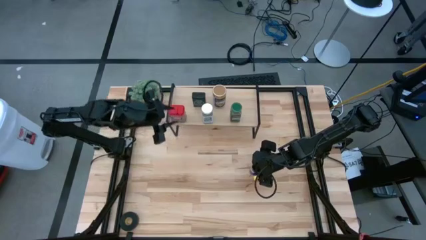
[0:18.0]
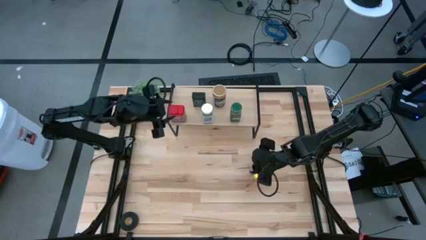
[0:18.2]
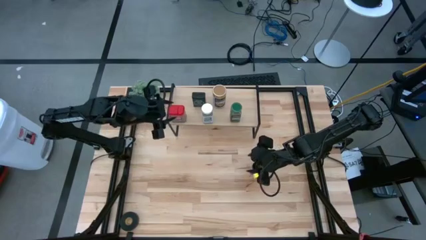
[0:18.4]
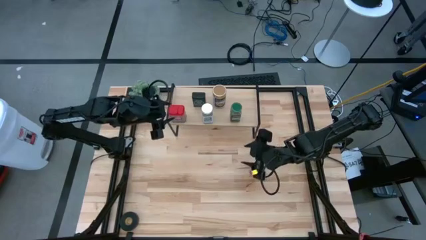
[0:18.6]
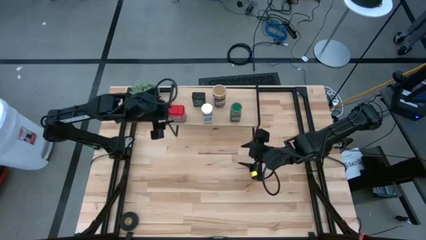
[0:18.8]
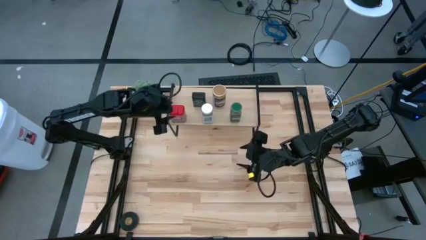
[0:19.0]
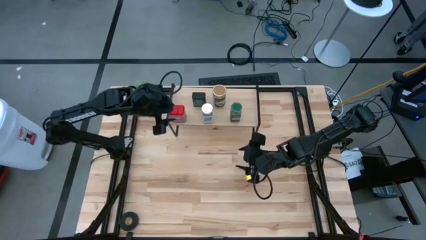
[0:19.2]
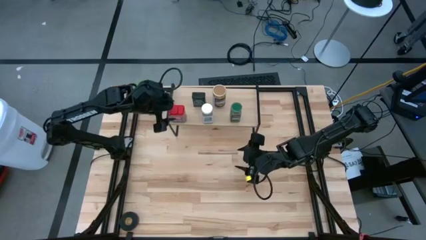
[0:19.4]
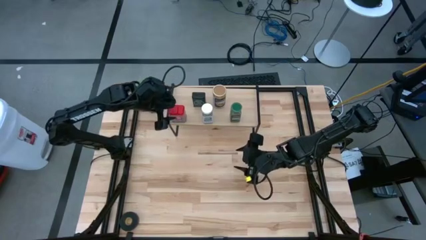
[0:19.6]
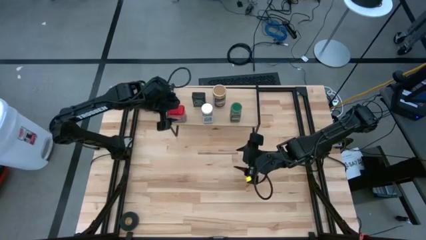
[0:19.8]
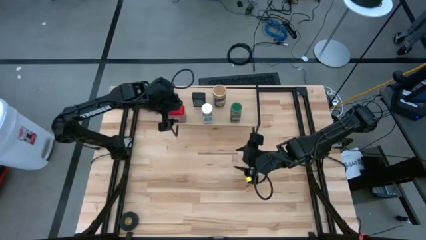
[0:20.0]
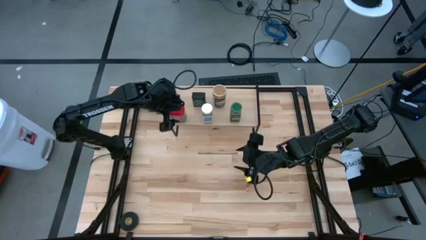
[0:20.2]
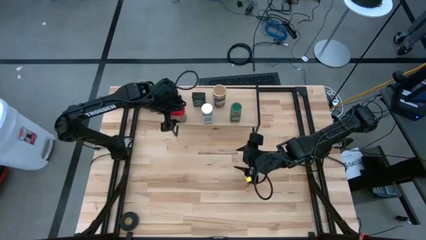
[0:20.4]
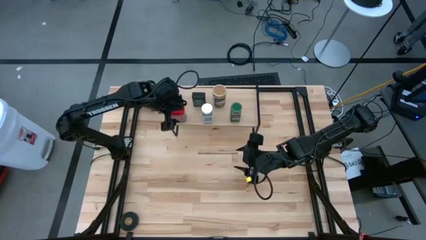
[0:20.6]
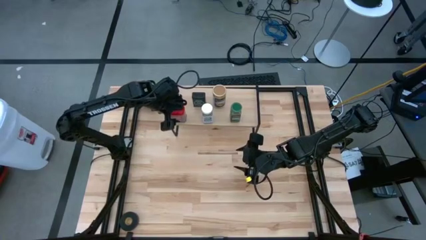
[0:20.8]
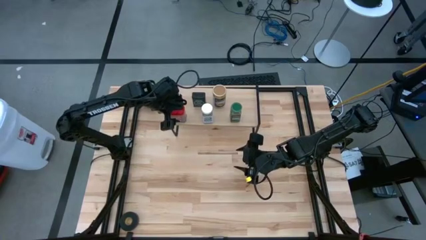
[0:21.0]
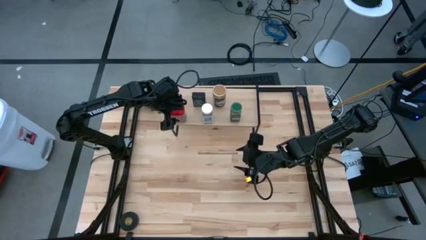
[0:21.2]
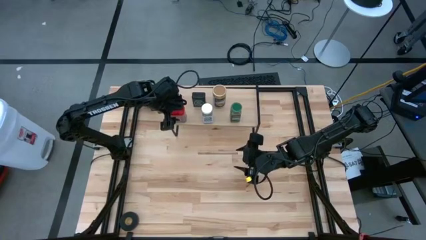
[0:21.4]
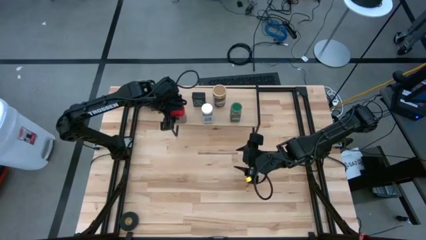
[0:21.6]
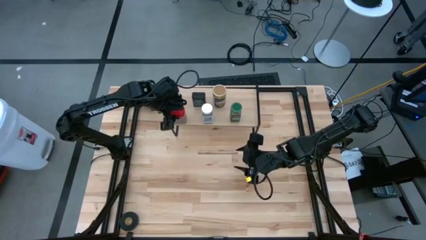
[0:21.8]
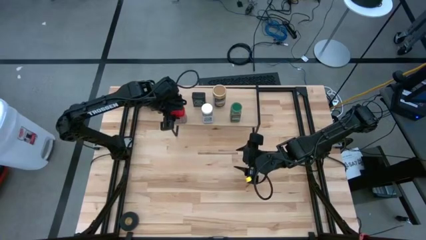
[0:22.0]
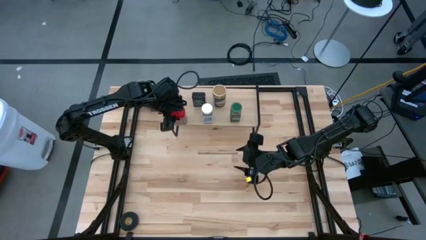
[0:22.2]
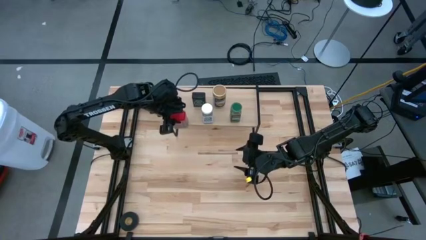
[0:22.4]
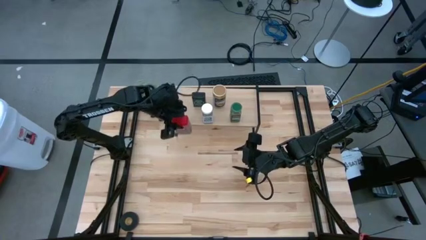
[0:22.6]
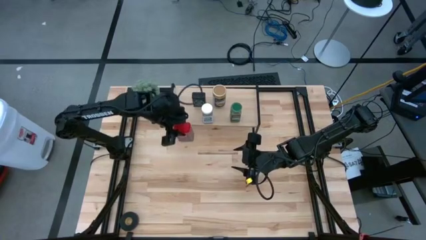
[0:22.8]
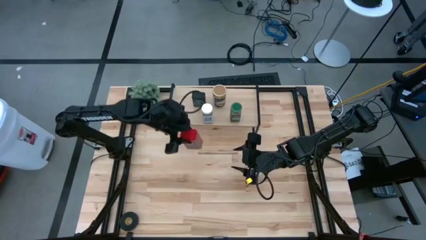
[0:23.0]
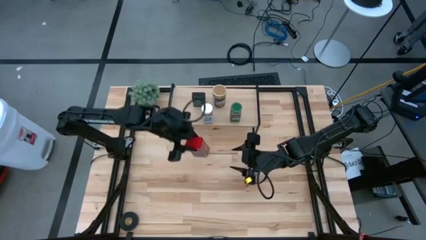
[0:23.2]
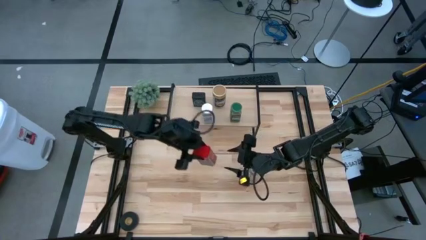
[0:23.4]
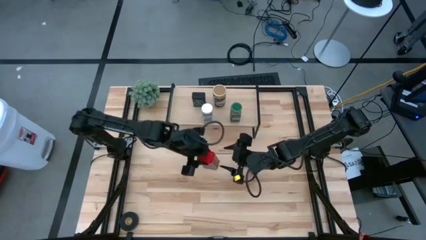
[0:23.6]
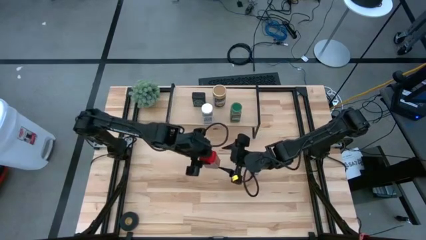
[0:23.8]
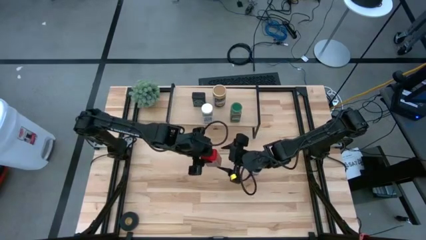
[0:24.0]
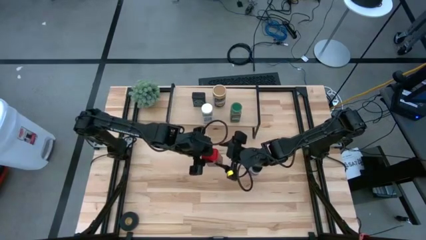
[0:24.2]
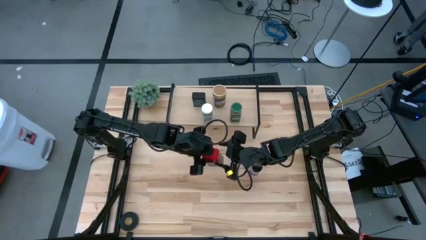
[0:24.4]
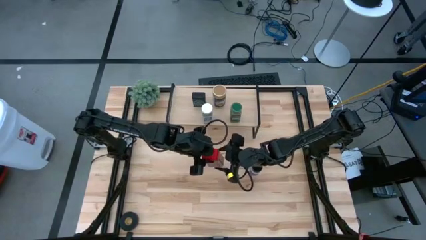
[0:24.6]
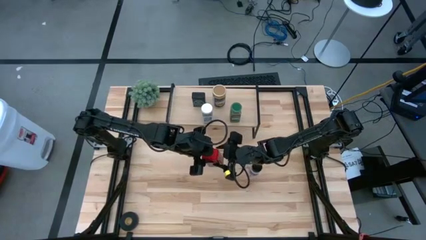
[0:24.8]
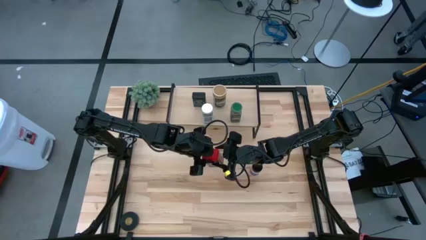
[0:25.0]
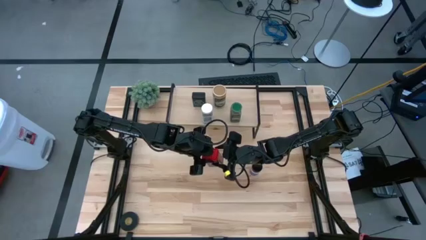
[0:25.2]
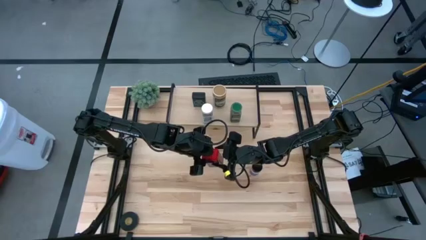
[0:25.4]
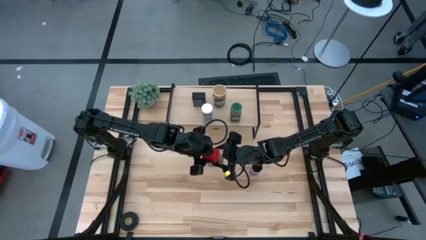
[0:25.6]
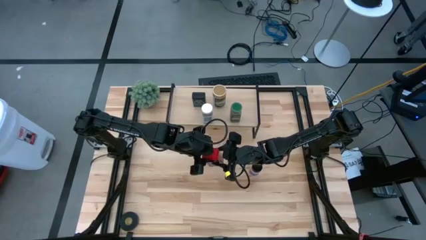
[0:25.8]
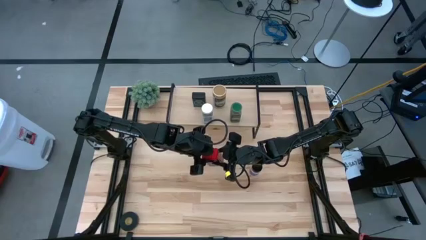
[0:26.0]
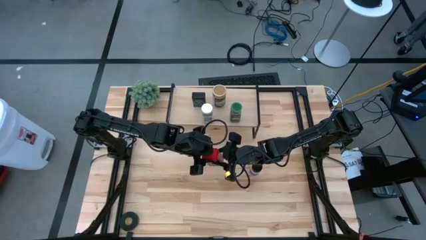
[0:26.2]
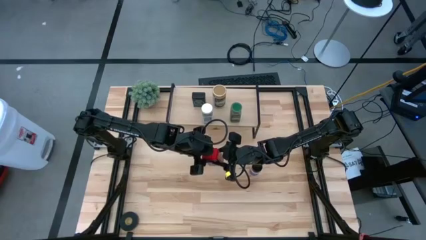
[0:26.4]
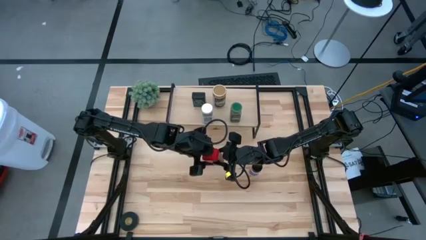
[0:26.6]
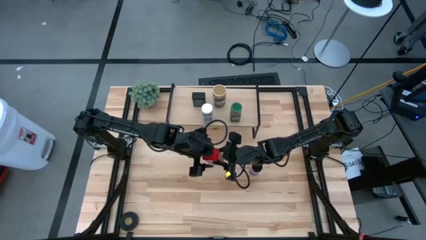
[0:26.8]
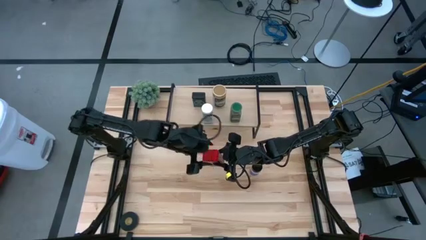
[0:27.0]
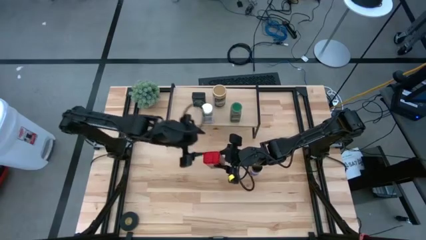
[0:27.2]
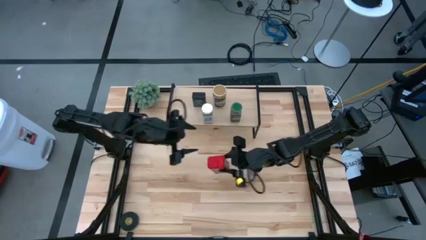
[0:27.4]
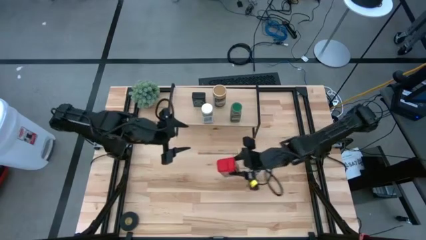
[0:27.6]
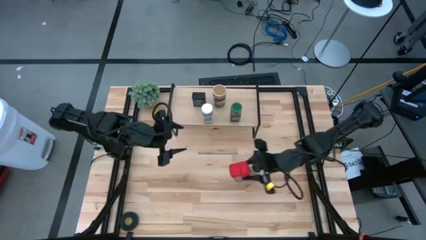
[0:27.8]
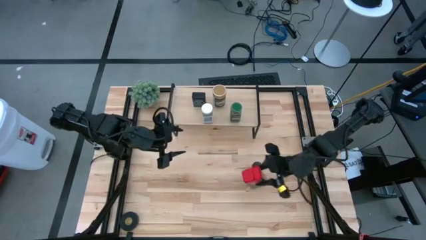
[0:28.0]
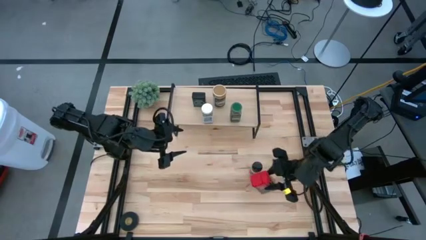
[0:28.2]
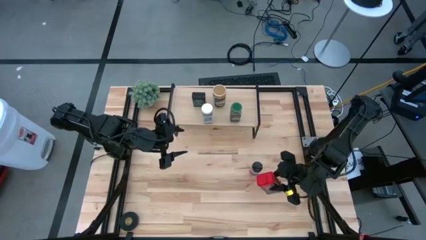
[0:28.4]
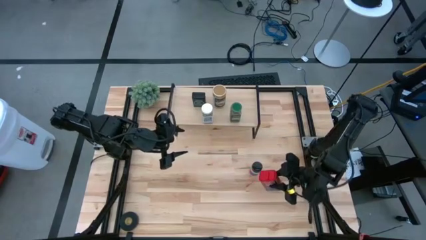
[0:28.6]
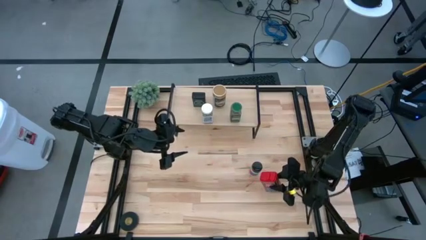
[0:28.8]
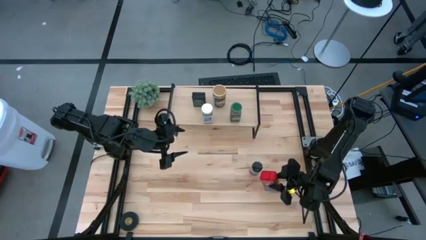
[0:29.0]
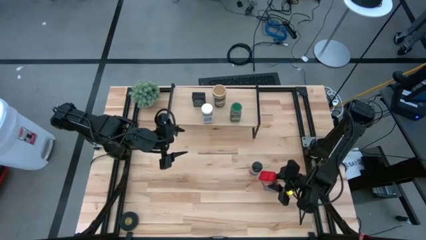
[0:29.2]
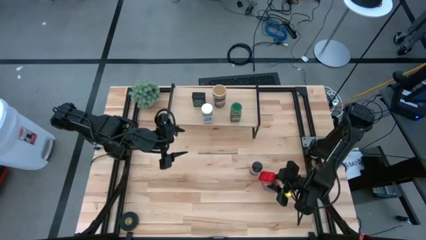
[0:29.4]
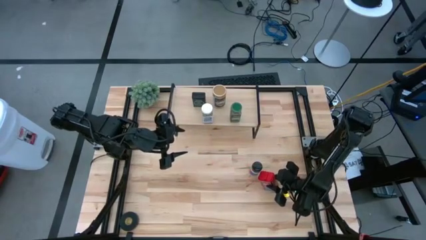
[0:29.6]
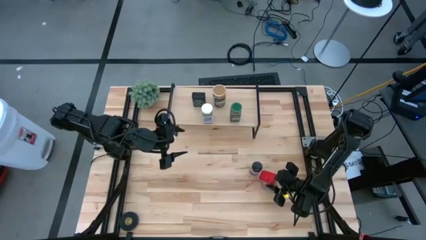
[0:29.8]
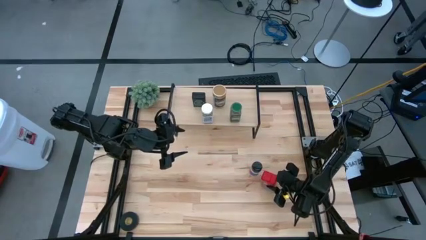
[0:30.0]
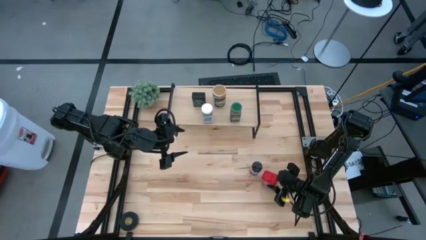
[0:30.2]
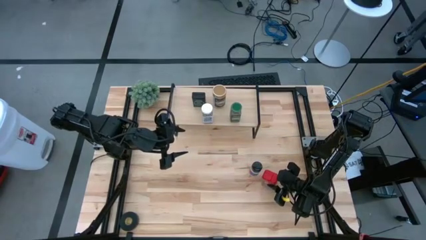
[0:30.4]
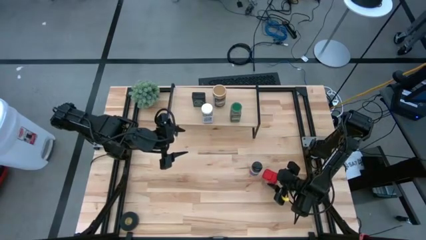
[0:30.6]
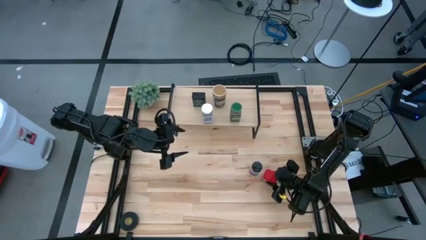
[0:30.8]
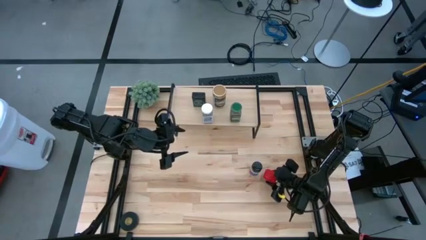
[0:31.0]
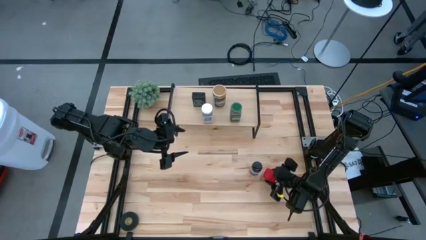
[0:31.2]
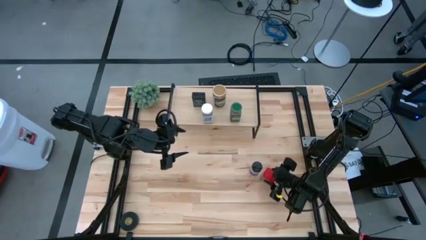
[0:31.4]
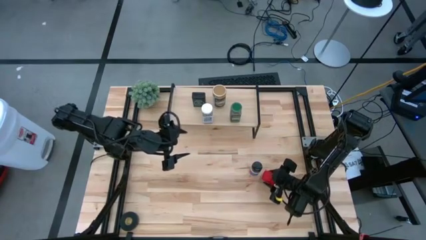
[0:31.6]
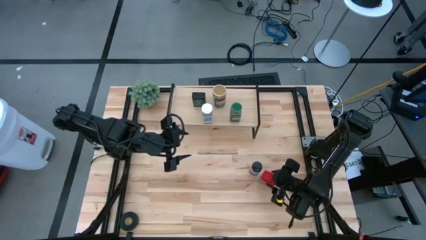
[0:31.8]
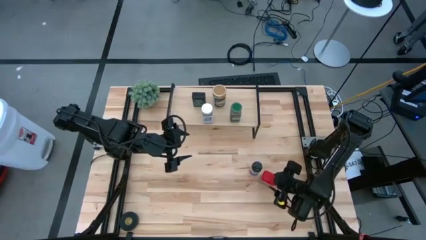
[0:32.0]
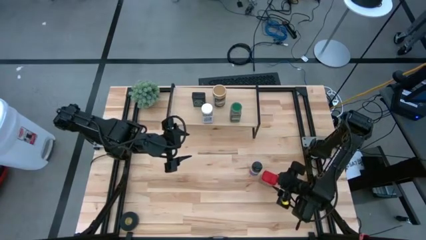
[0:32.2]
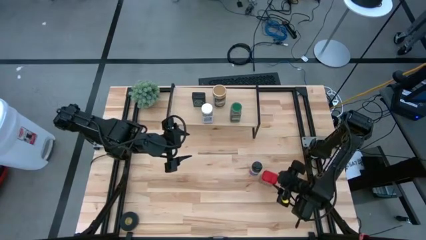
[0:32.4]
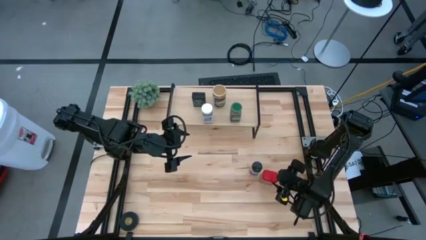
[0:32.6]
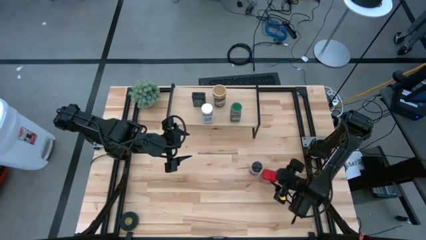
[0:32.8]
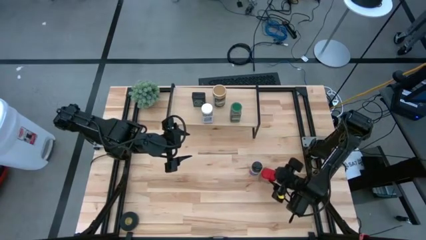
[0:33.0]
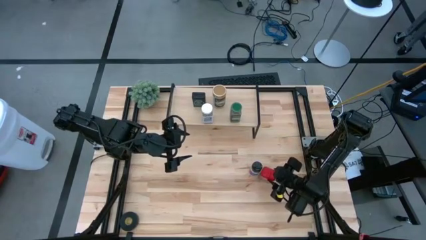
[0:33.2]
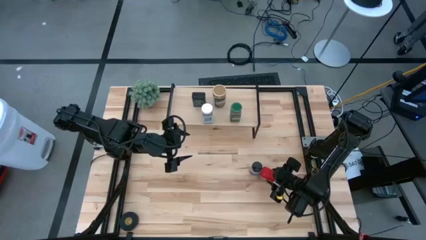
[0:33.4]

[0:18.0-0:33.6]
Task: Shelf spices
Remove the red seasoning can from the shelf

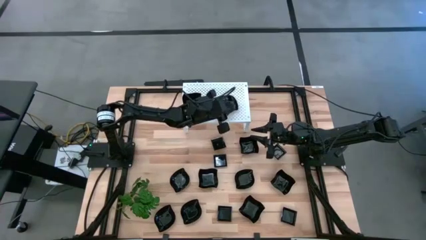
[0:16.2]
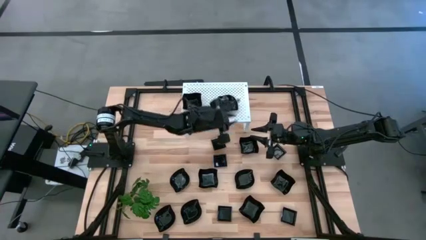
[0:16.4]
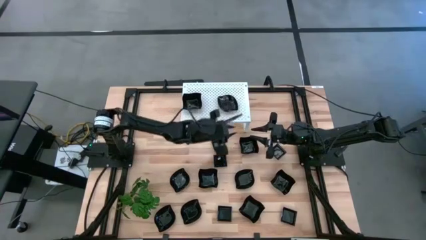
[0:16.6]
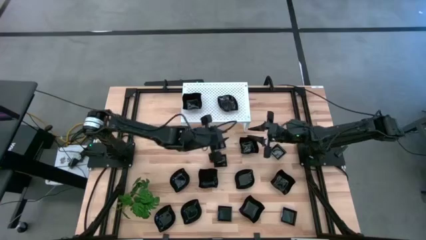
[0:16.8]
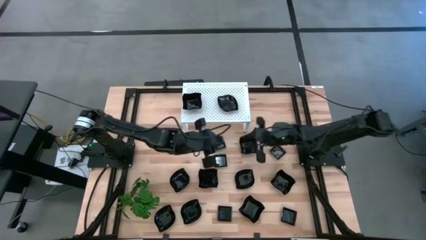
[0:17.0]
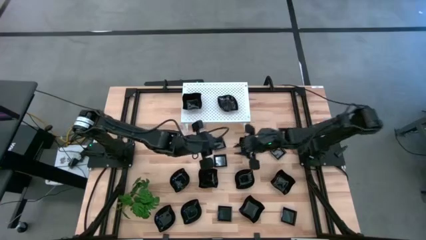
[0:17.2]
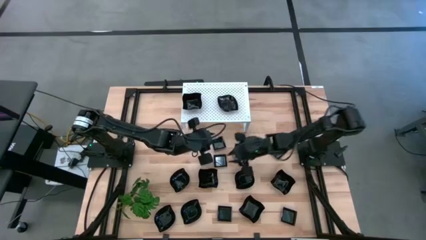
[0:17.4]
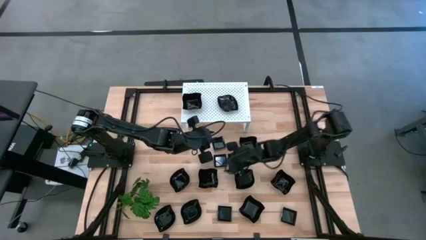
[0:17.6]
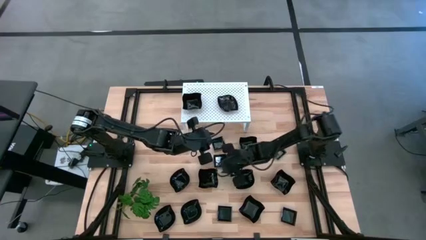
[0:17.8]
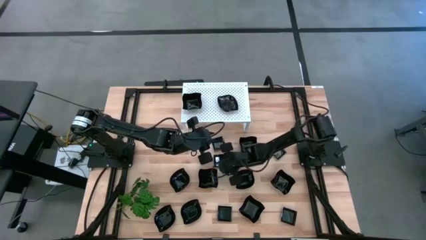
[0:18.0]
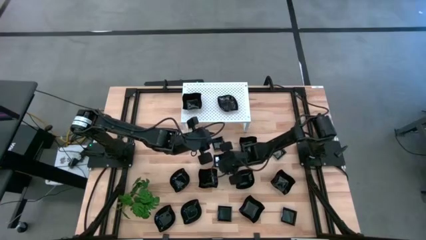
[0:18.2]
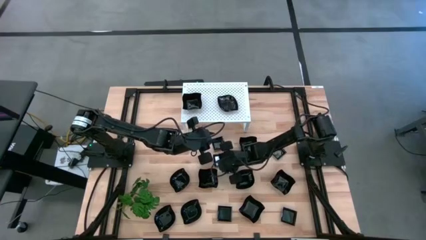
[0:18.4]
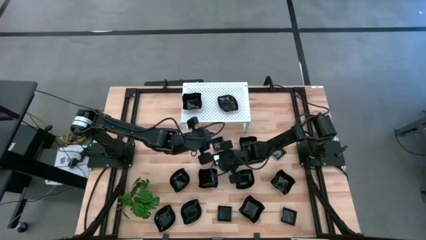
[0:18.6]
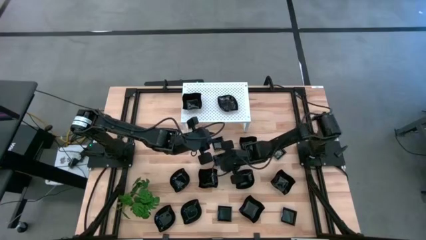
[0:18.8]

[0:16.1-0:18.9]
Task: Pick & Place Mini shaped plates
Put the square plate on the shelf
